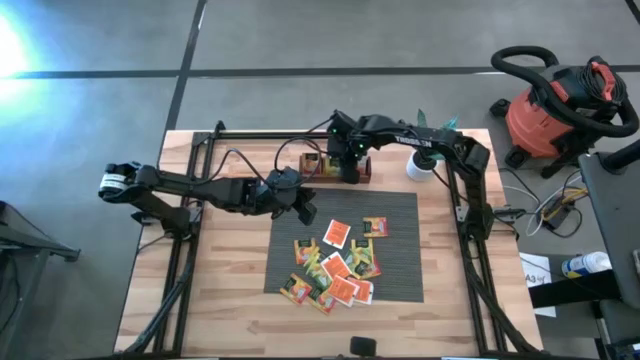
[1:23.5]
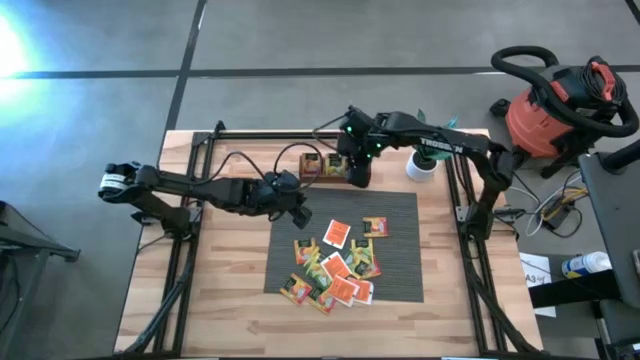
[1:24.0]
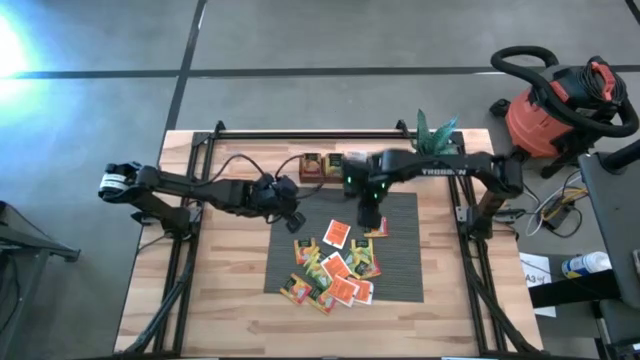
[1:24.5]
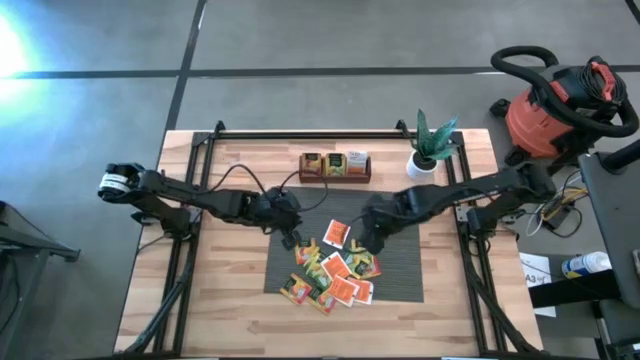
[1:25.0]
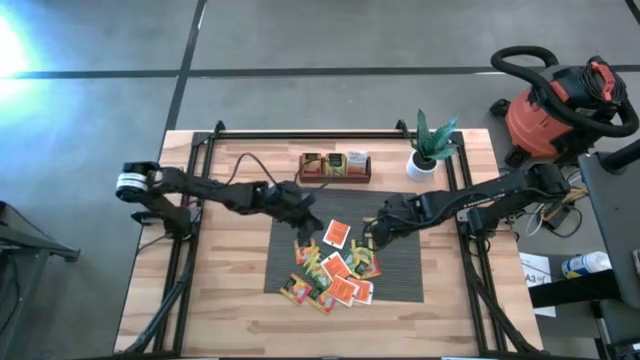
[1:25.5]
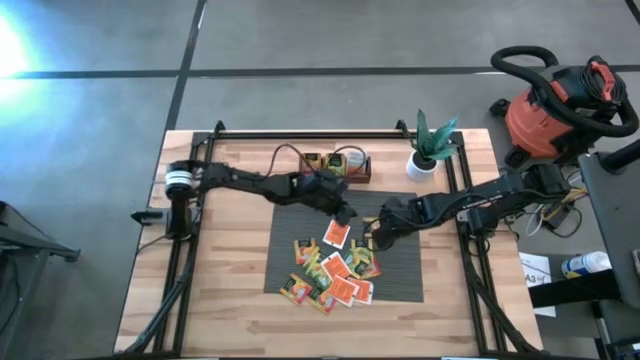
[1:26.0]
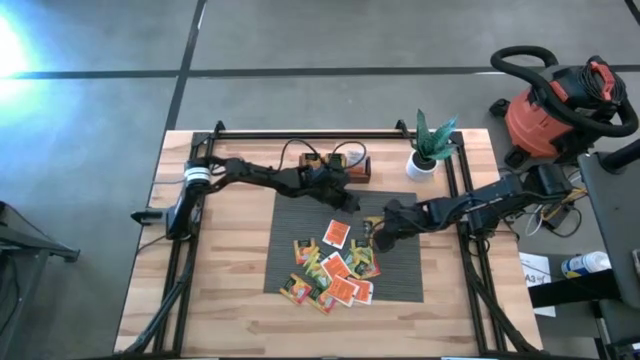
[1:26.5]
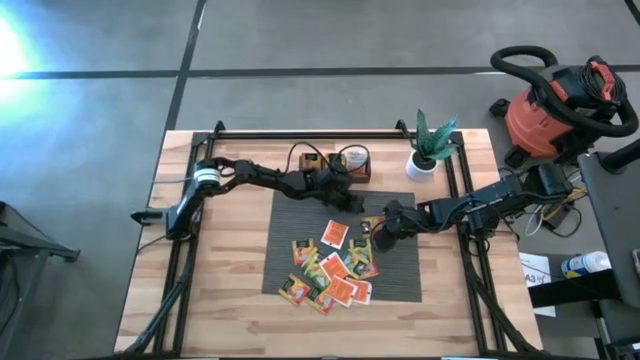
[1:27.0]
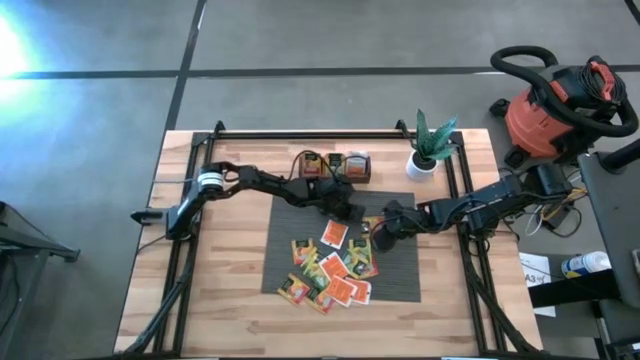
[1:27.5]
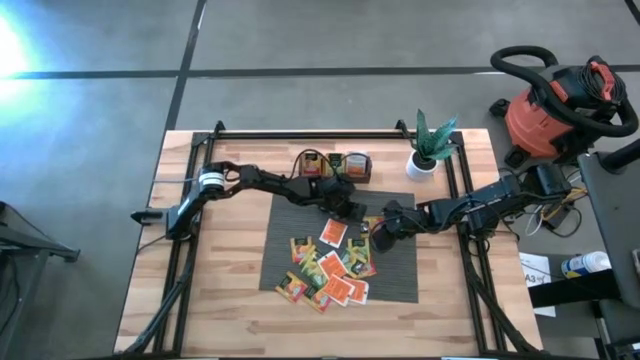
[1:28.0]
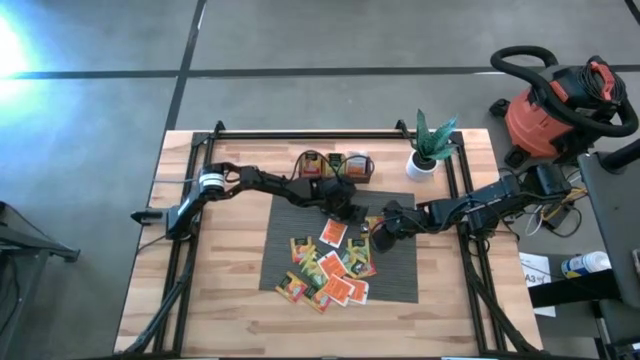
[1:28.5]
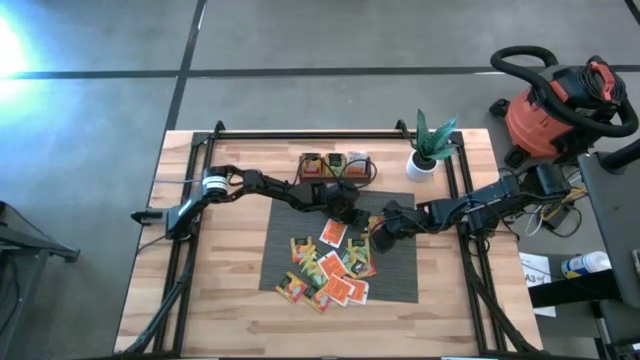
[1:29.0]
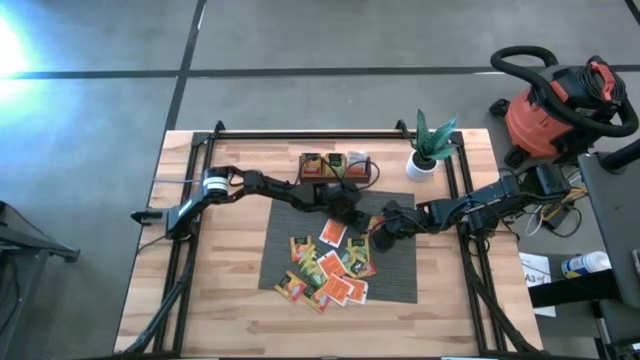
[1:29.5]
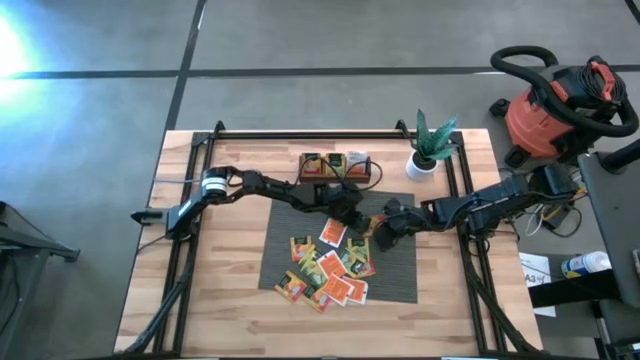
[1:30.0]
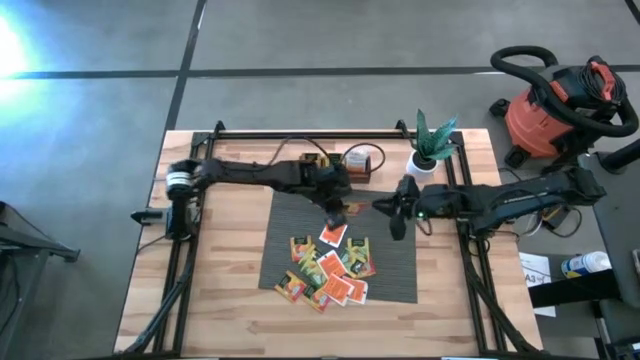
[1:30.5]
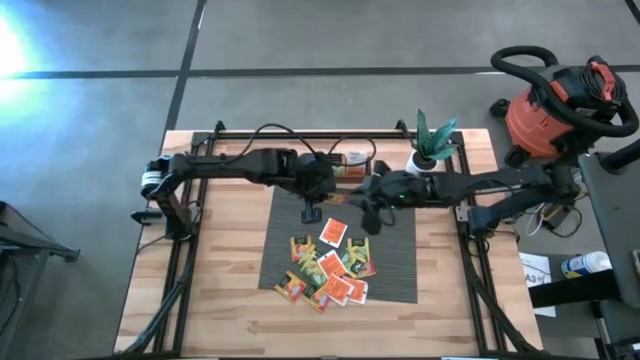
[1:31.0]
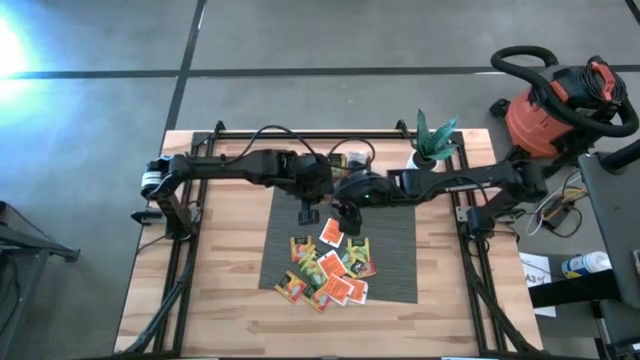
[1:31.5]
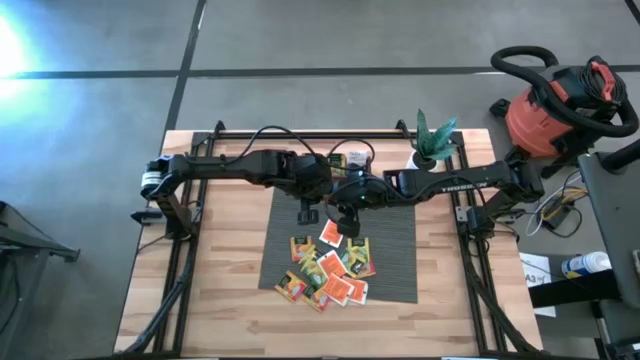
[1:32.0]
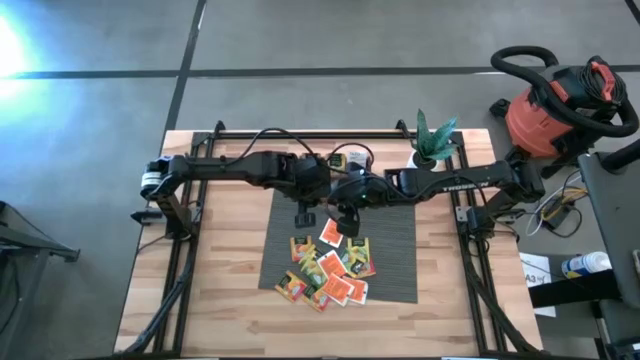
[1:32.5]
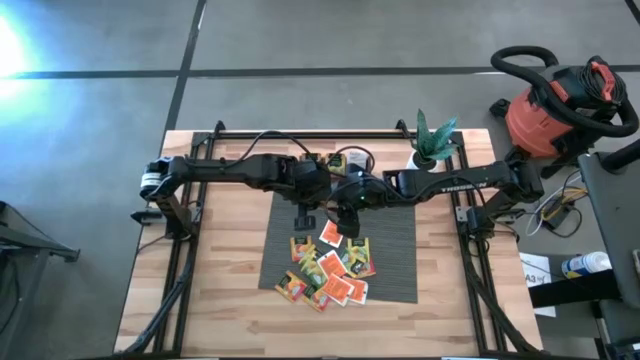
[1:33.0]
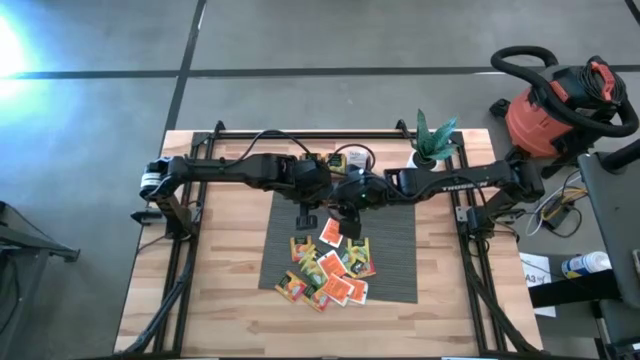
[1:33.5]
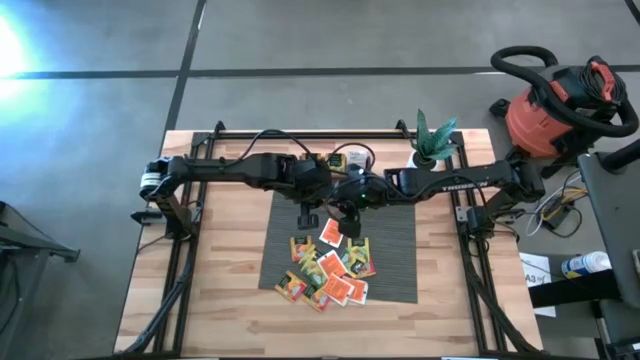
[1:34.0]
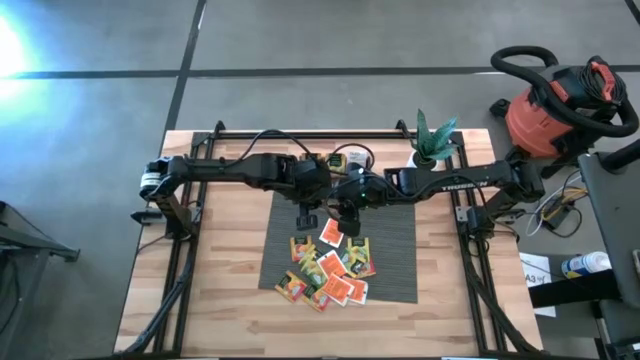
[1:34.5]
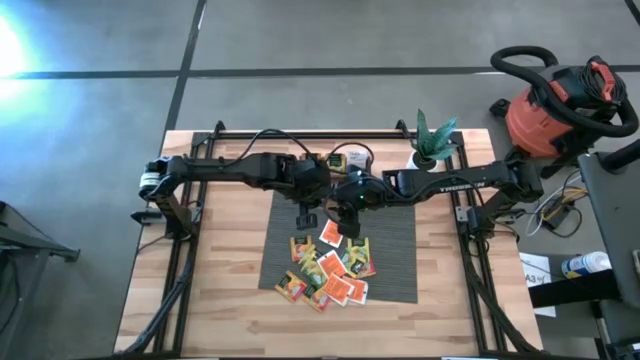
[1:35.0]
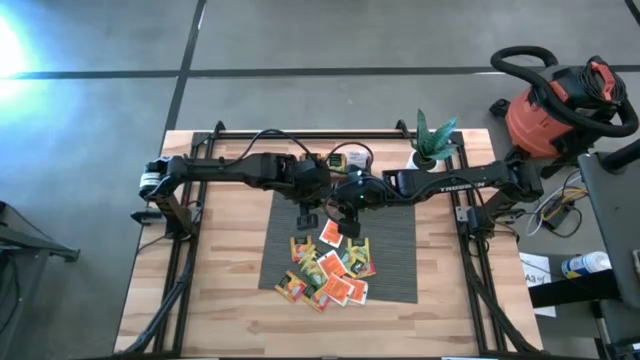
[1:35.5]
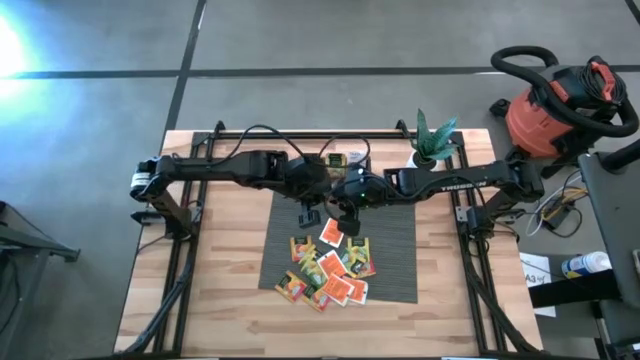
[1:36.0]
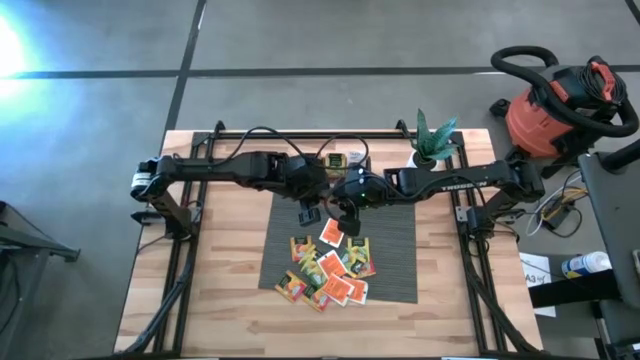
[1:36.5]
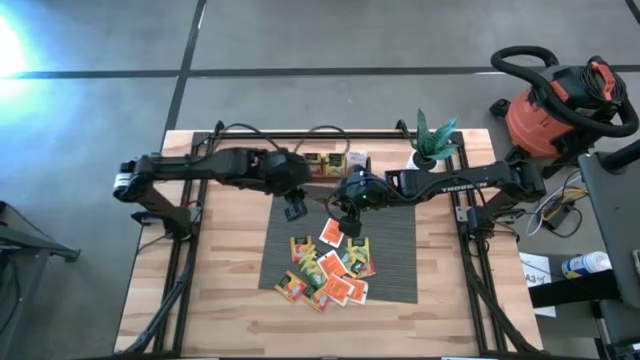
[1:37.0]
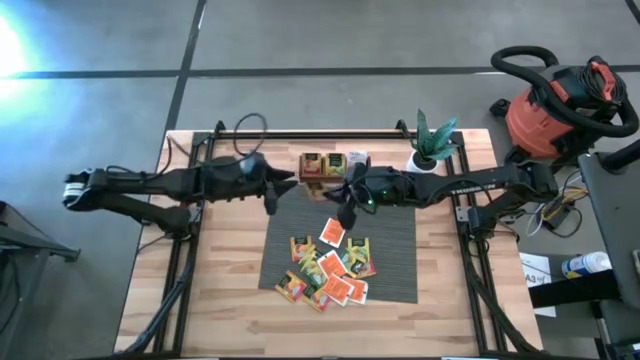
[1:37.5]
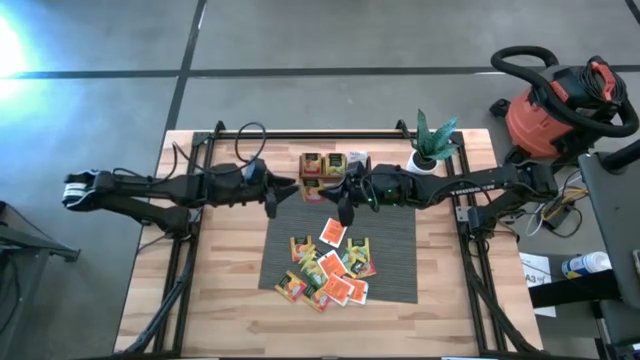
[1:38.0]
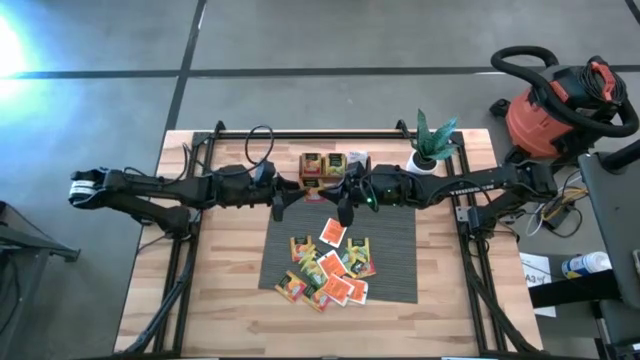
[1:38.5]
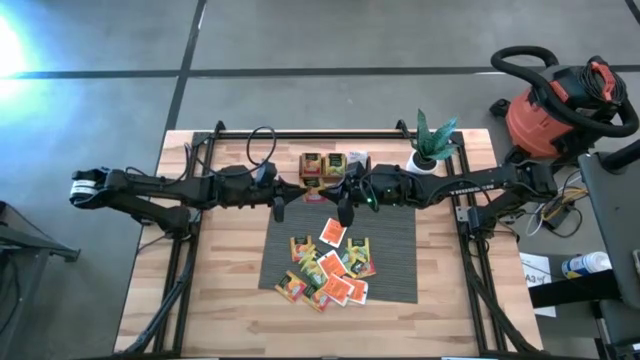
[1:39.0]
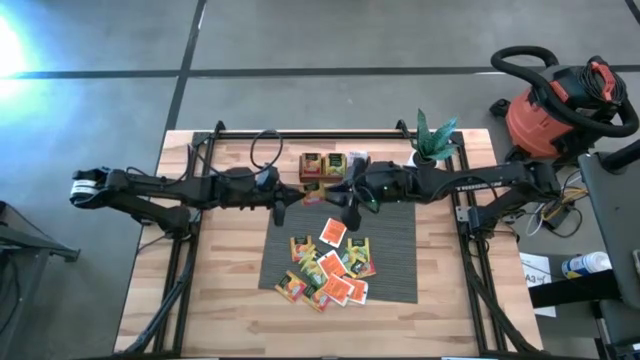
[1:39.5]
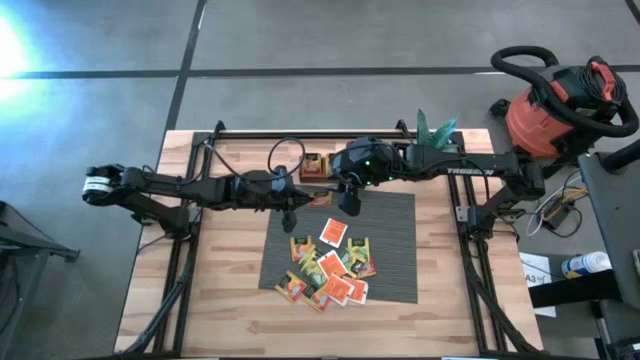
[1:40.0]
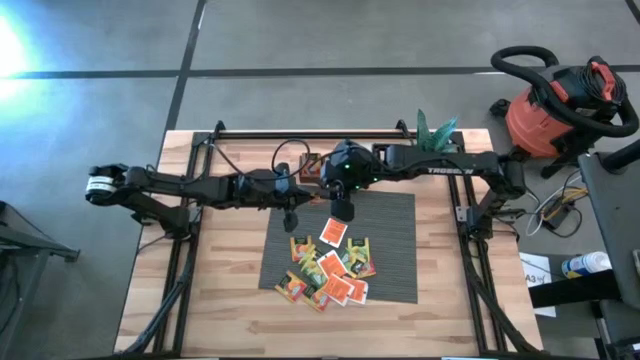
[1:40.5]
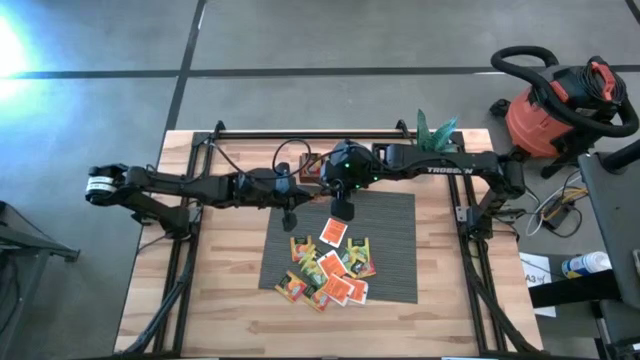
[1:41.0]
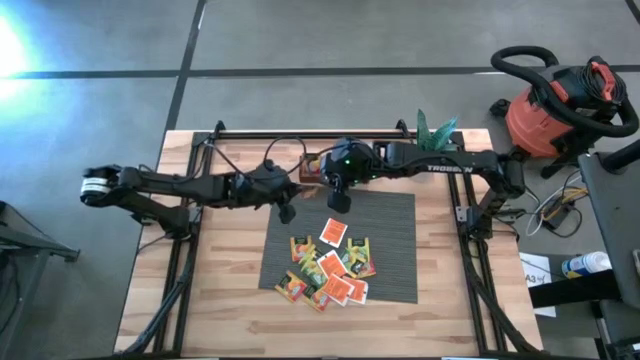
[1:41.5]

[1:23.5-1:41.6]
Task: Pick & Place Tea
Put the orange tea bag into the left section of the wooden organizer

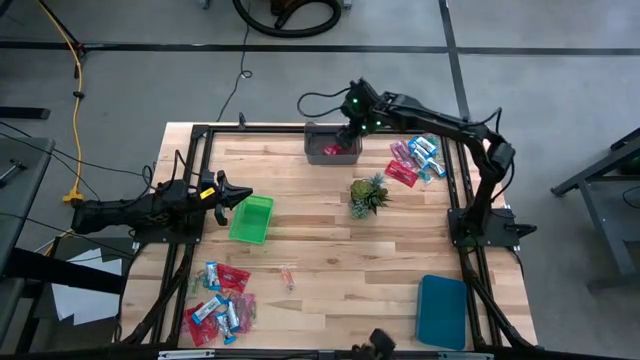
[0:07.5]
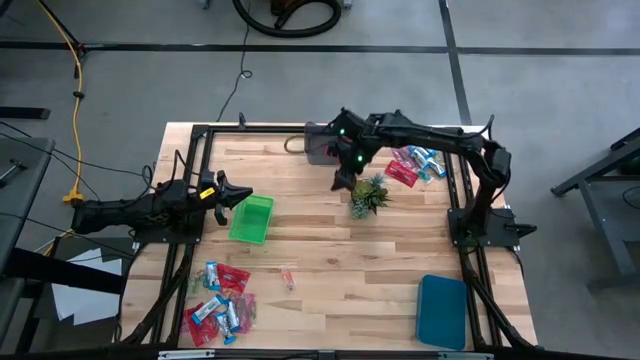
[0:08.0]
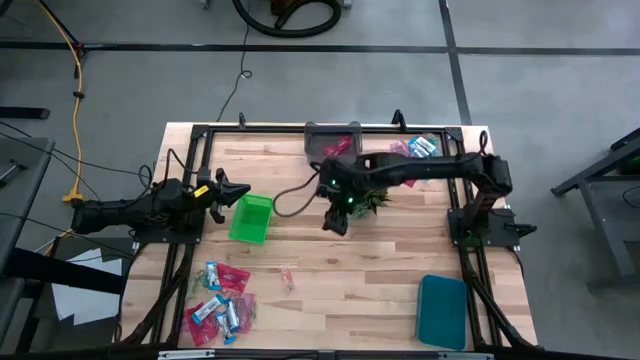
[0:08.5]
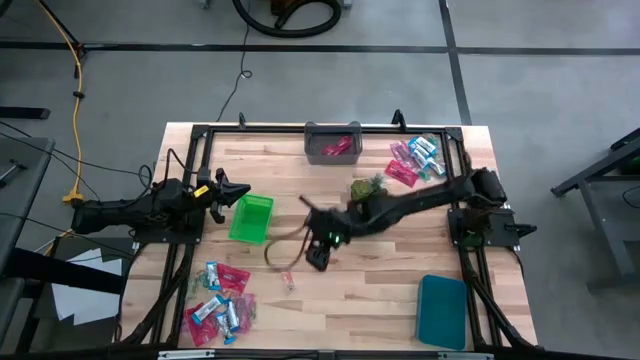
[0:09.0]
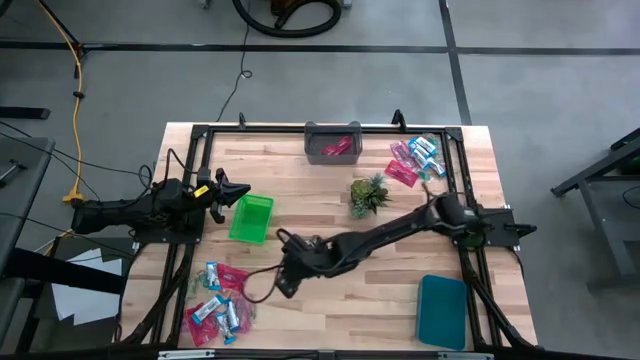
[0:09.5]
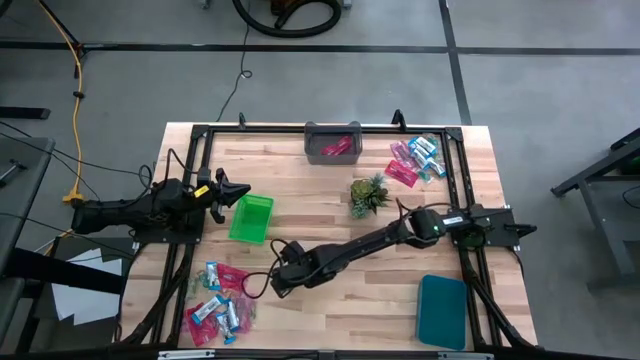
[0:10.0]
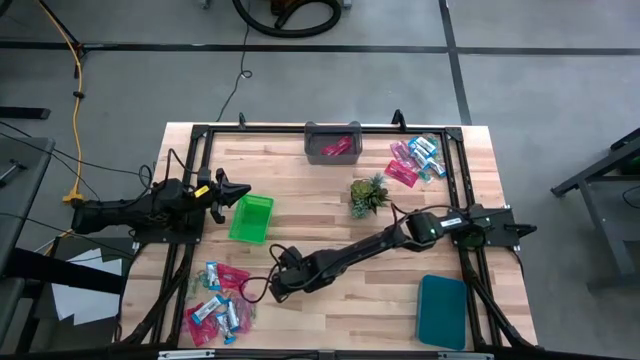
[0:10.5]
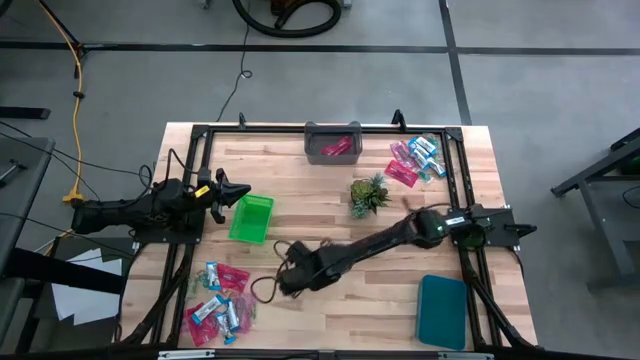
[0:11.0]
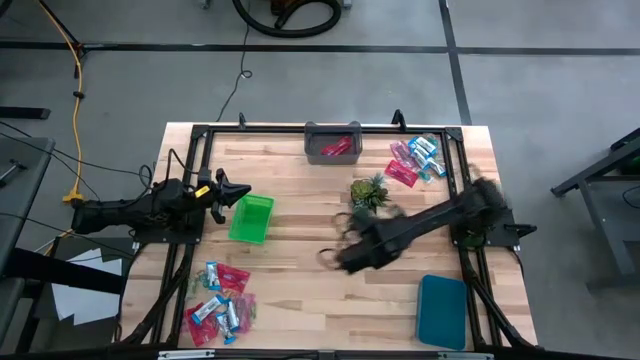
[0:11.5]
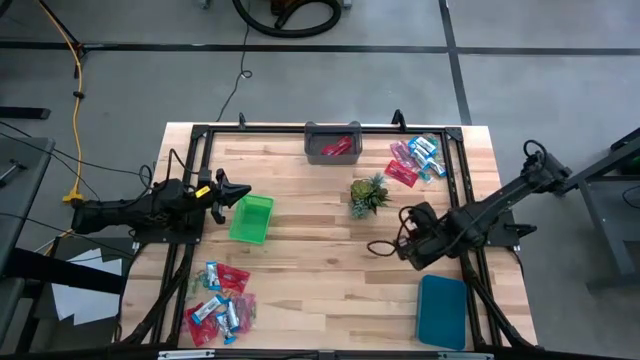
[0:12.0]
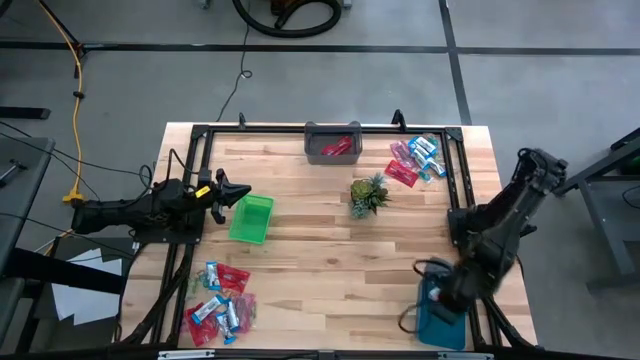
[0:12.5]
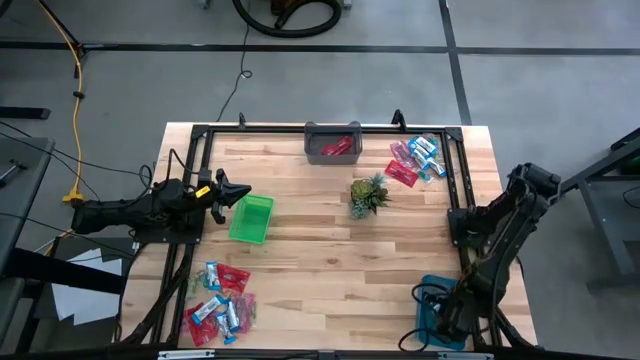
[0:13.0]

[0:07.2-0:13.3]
Task: Sort candy
Put the transparent candy into the blue bin
